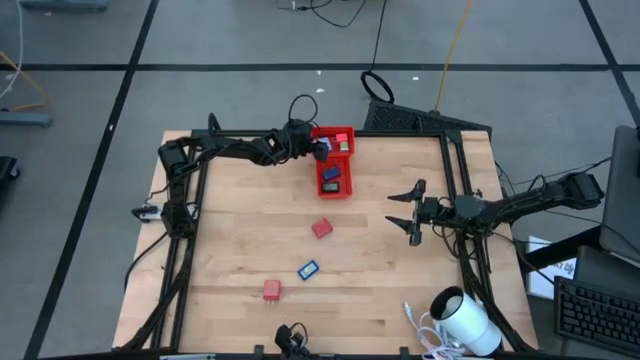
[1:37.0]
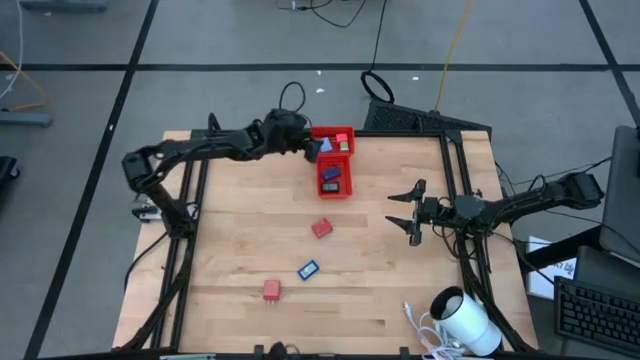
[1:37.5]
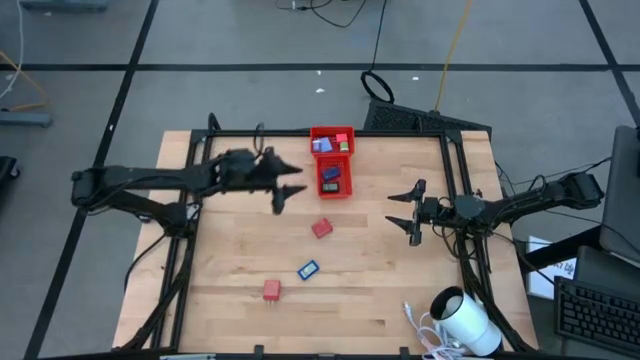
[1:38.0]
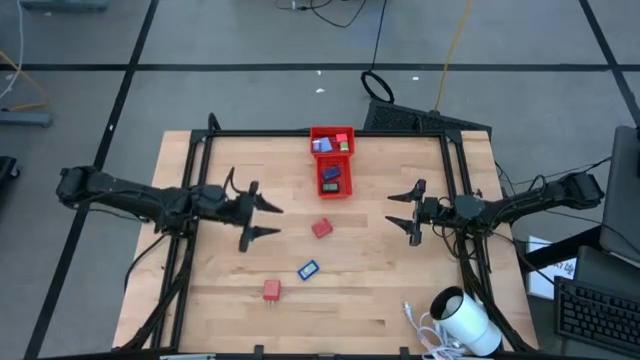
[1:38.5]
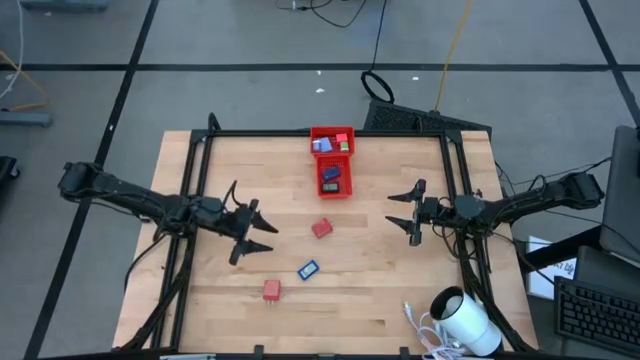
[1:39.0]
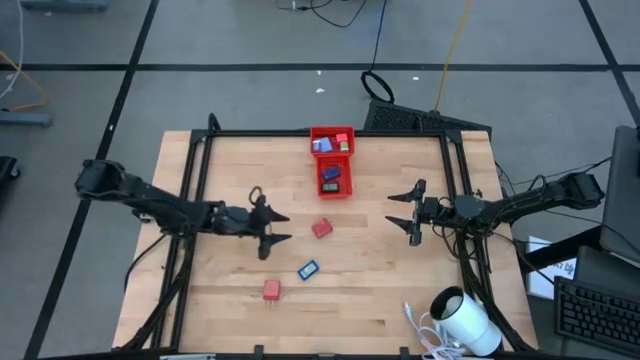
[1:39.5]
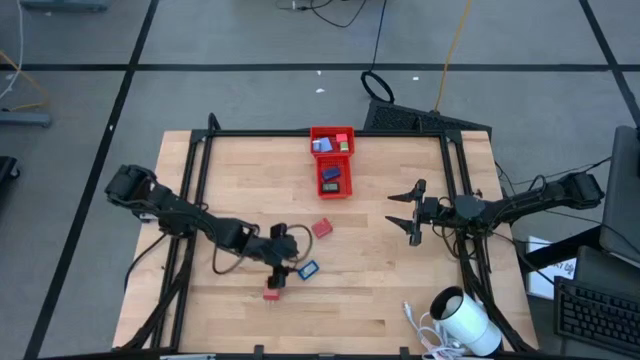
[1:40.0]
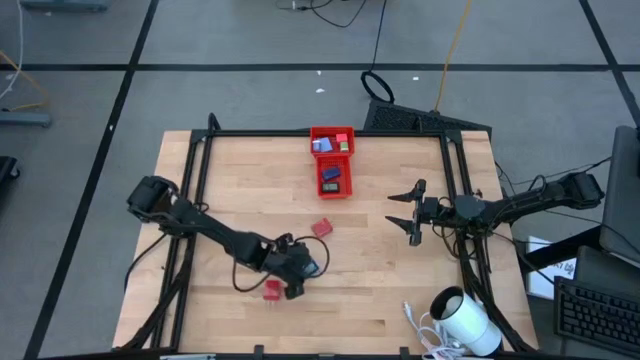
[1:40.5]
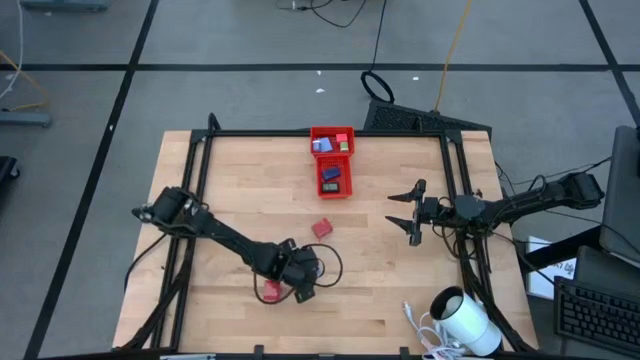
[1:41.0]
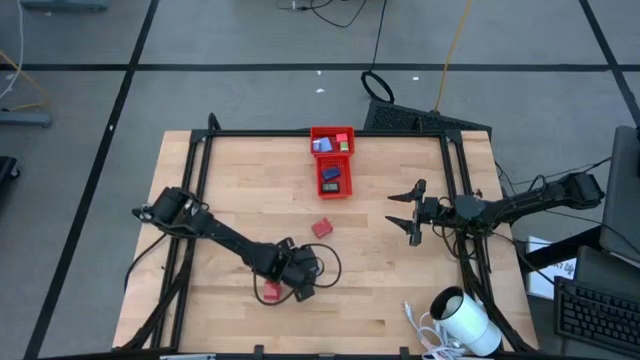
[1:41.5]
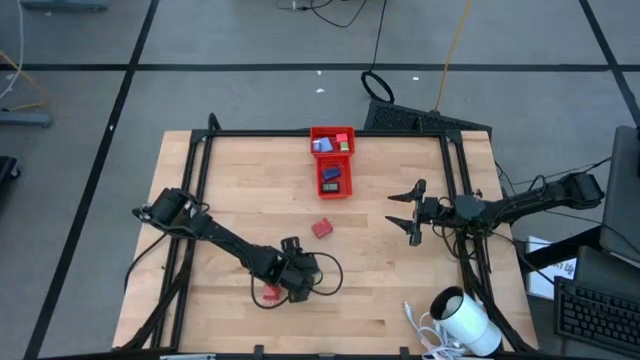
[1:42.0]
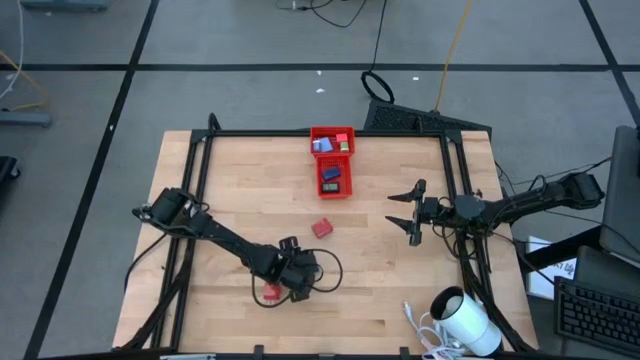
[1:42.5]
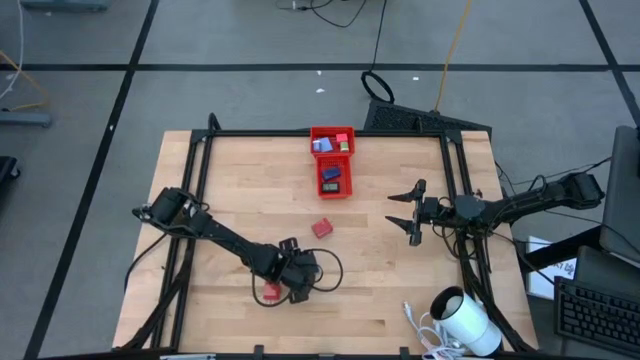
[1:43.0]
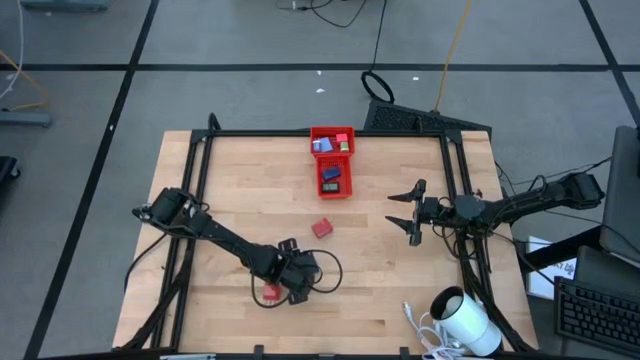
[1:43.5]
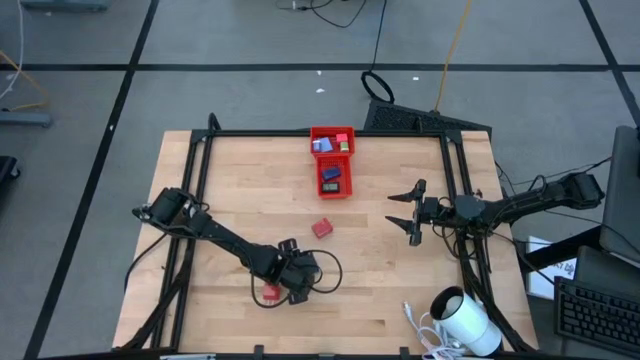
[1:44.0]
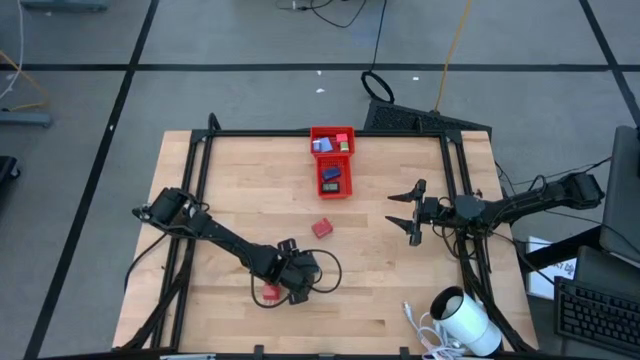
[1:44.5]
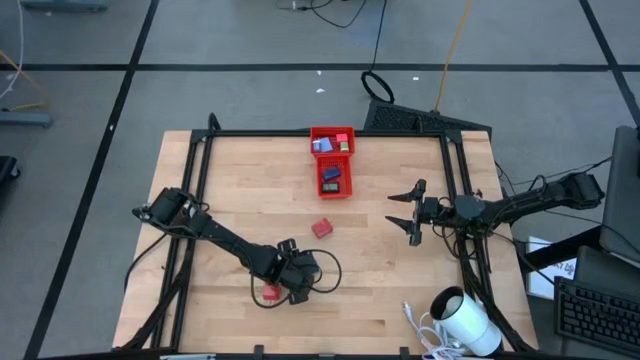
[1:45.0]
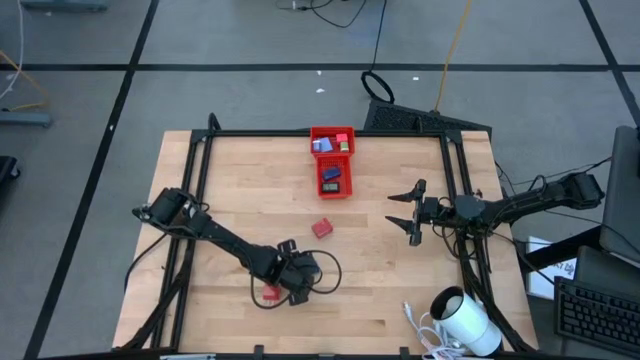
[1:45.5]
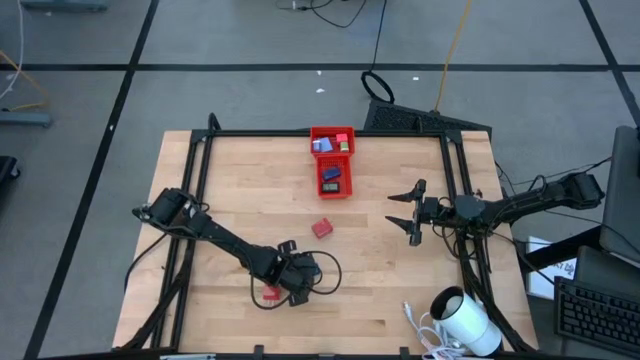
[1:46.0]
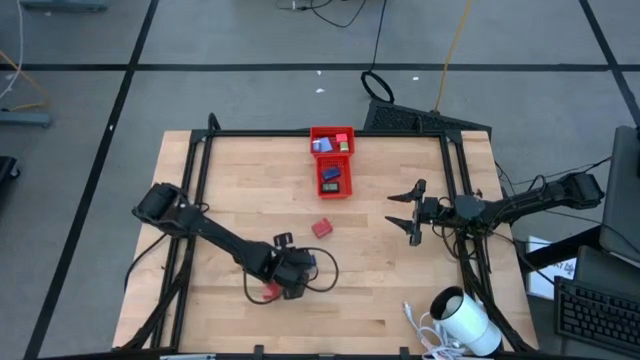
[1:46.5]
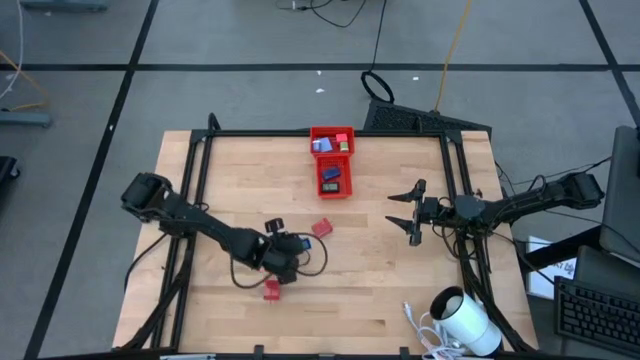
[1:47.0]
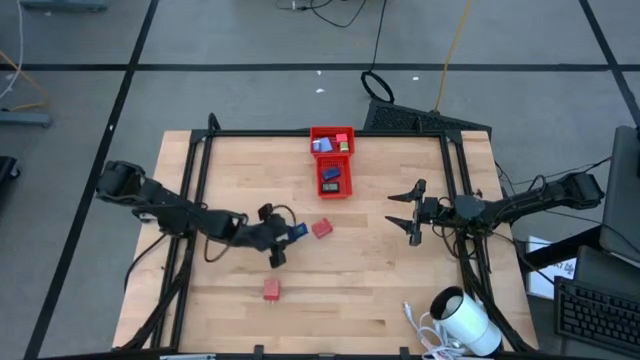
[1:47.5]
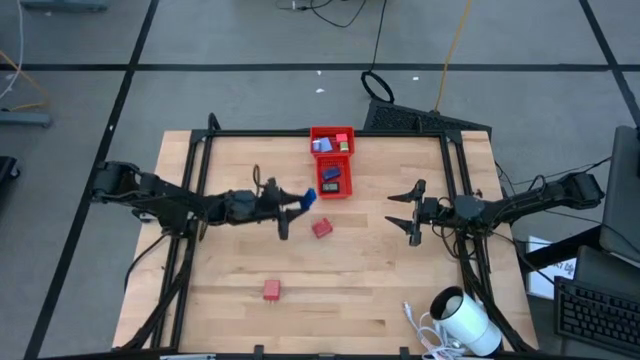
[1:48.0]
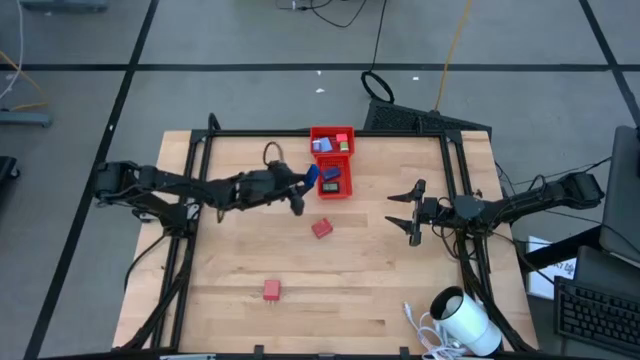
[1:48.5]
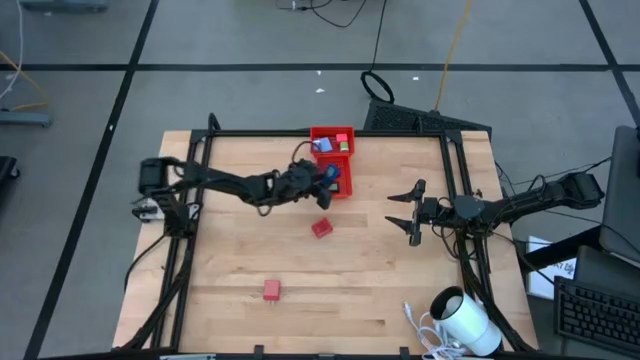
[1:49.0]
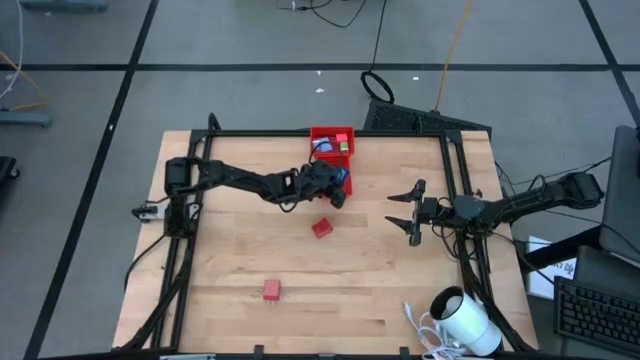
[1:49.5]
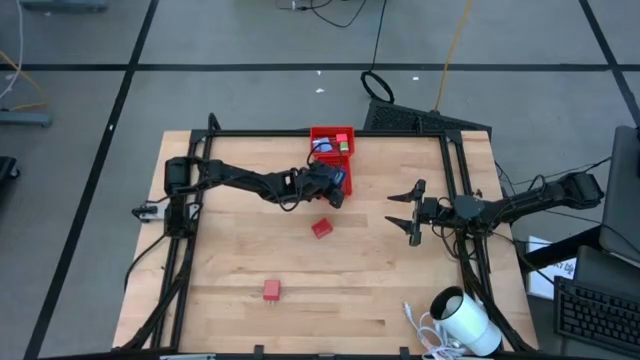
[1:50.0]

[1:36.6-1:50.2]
Task: Pick & Place Office items
Put the blue digital timer into the bottom red bin

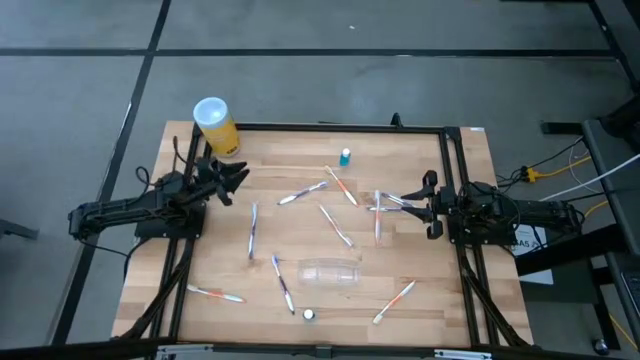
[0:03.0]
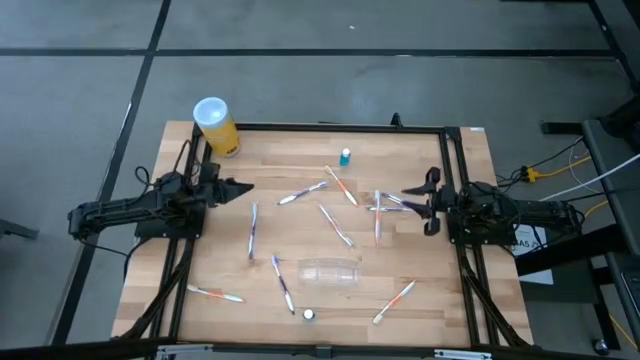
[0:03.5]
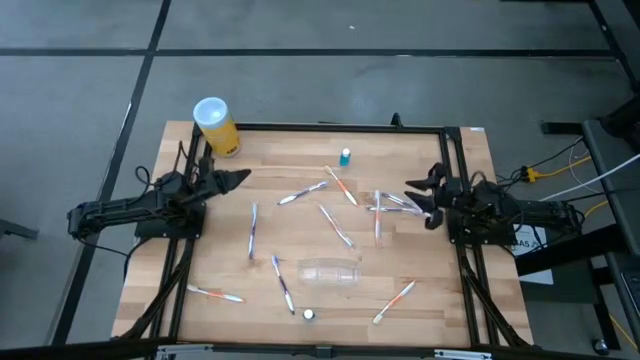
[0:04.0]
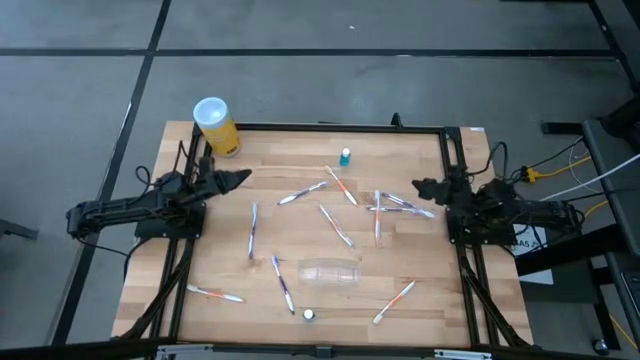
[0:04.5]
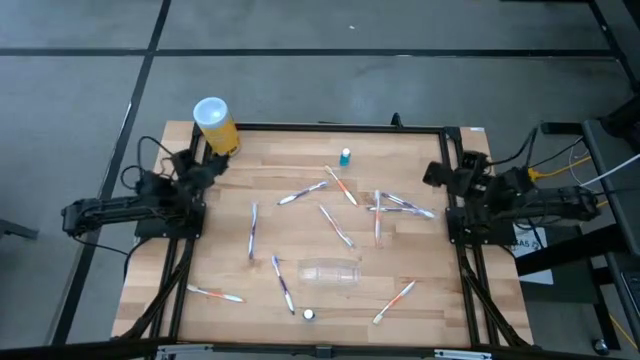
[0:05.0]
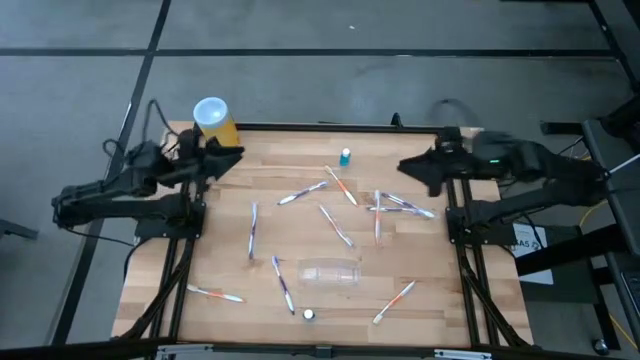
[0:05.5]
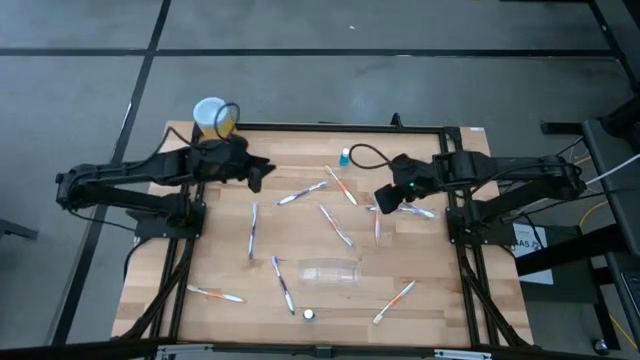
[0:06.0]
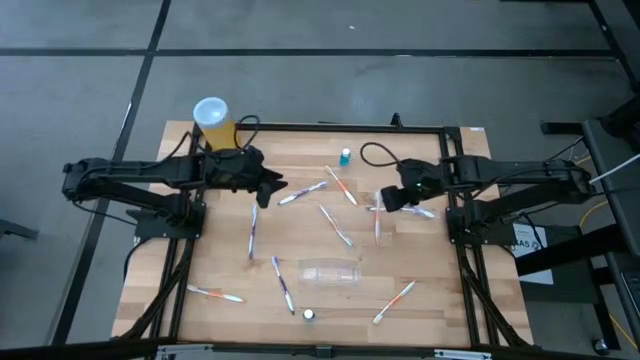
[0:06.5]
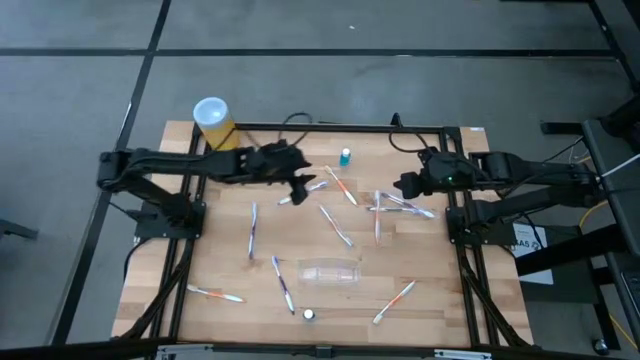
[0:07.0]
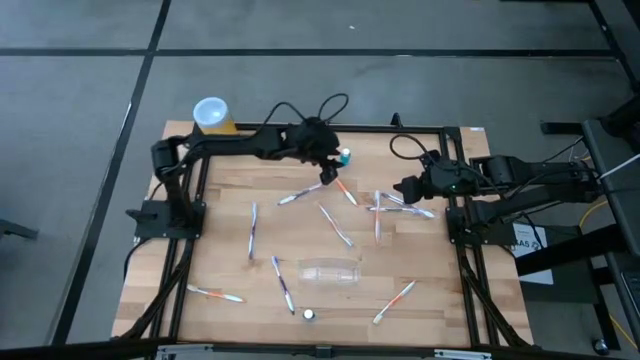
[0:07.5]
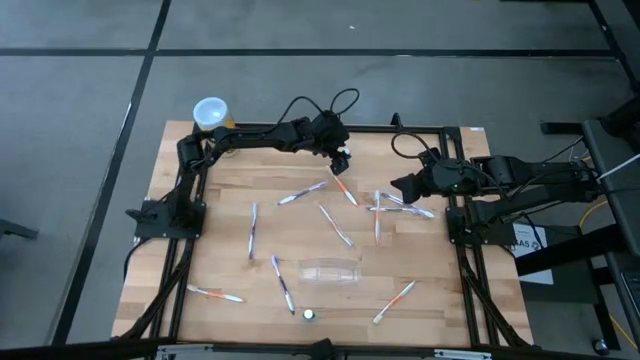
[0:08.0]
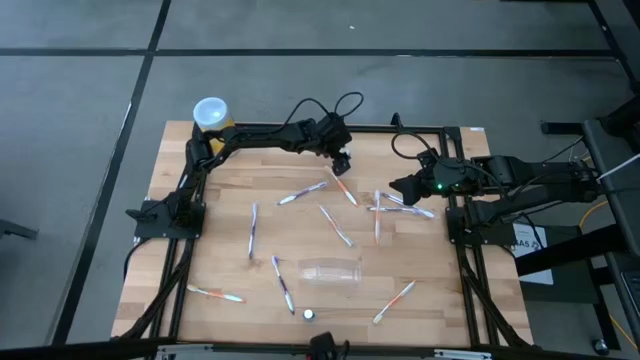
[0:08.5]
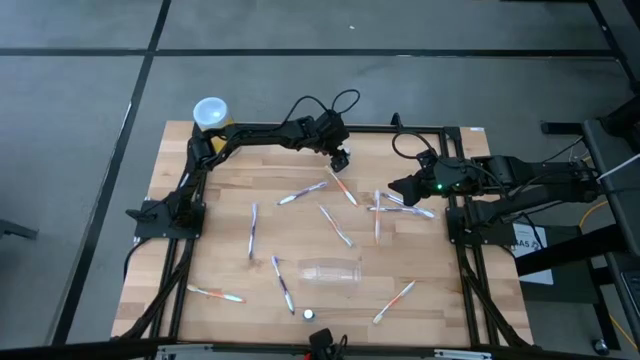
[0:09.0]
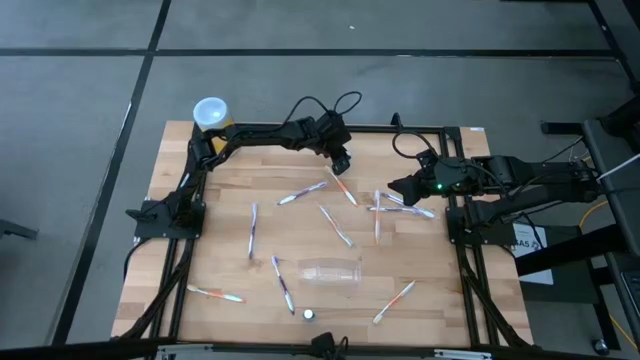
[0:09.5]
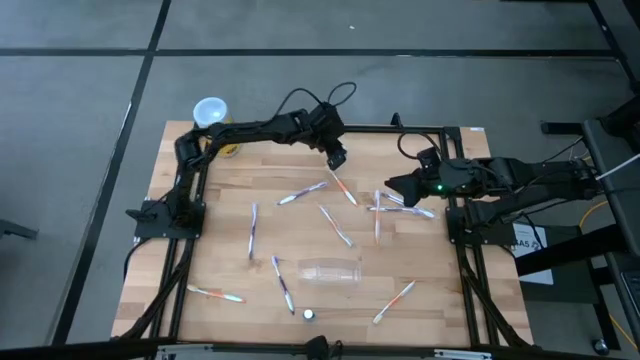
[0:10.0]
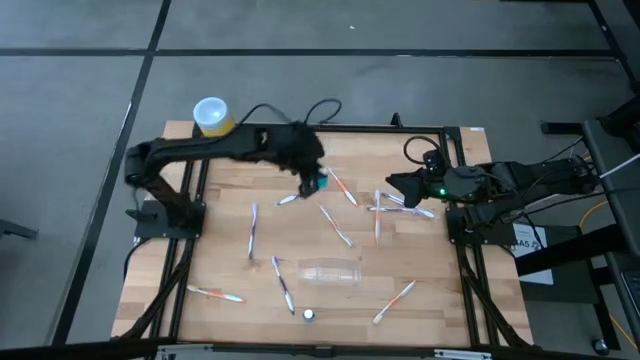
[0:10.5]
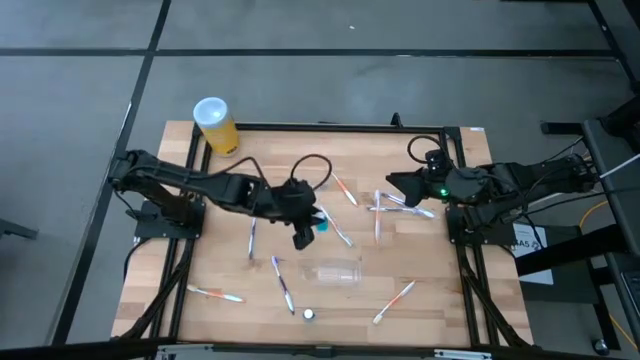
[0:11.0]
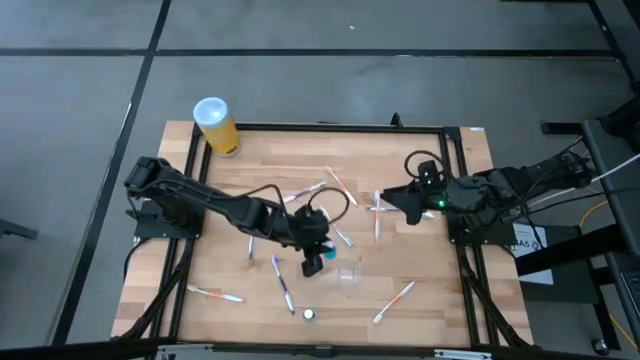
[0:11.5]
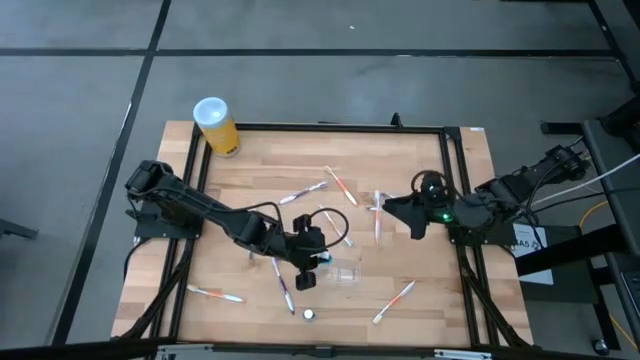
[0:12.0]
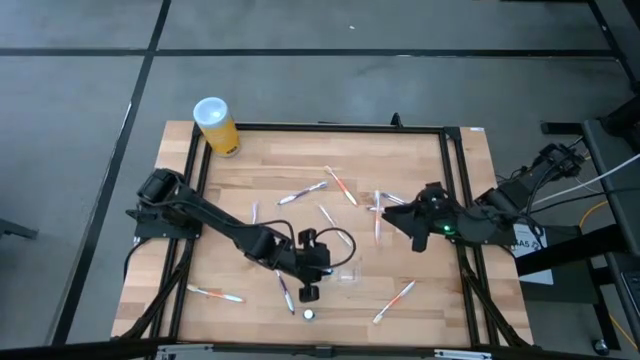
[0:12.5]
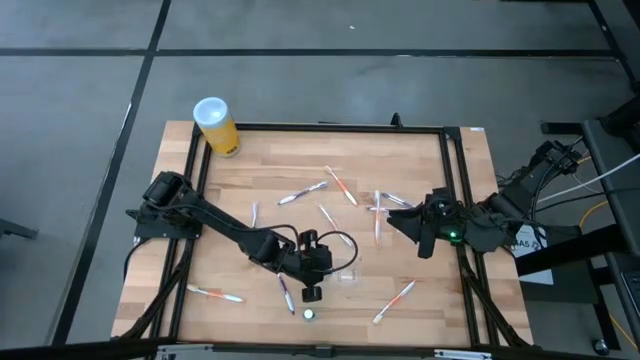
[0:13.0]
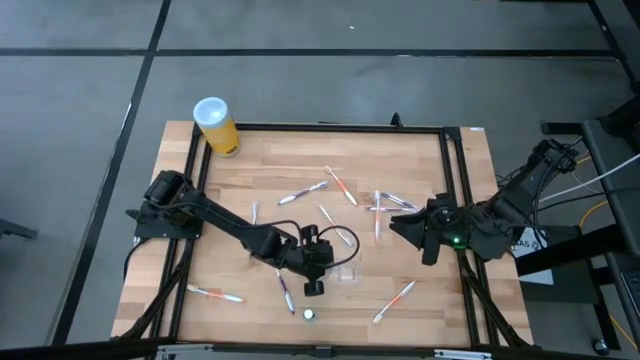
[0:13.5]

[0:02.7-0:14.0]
Task: Pick & Place toothbrushing station
Put the blue mouthwash into the middle section of the transparent organizer
